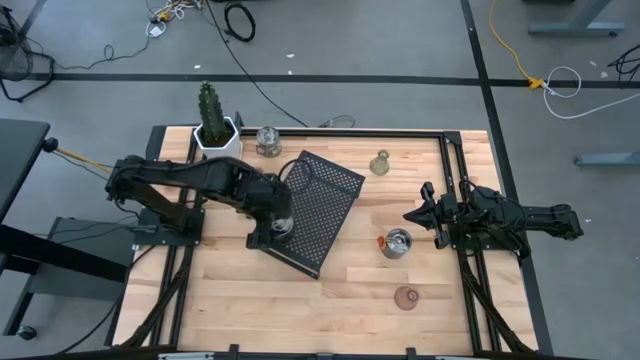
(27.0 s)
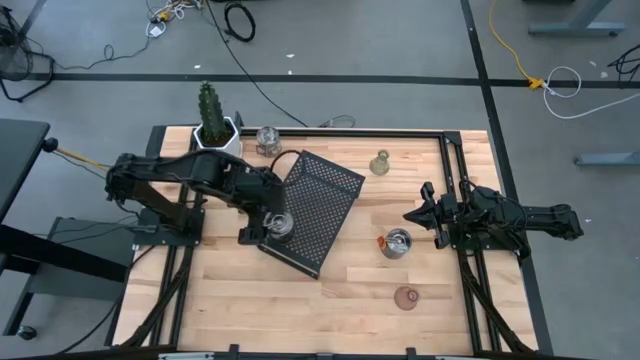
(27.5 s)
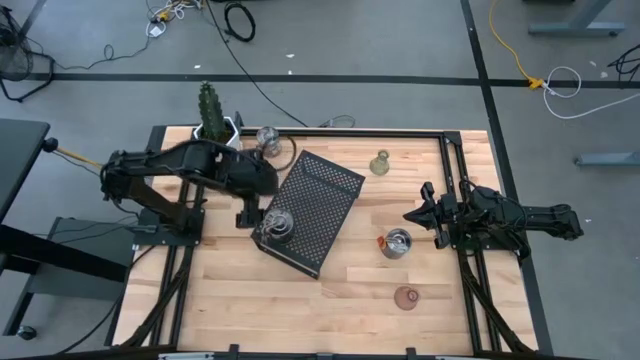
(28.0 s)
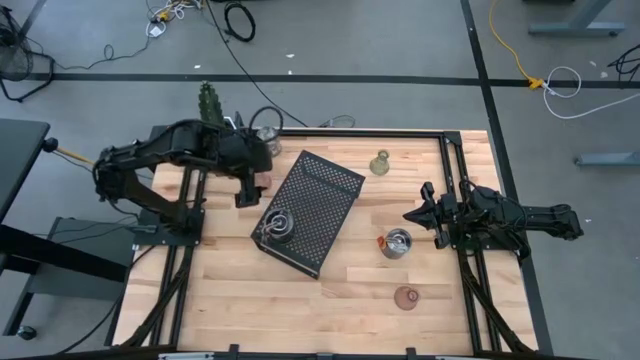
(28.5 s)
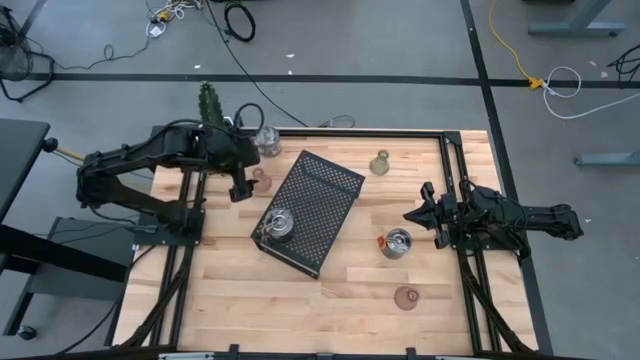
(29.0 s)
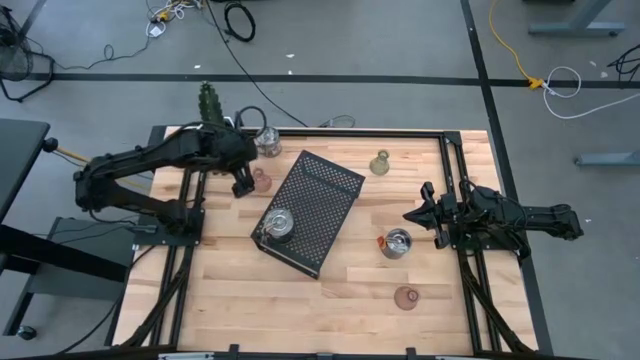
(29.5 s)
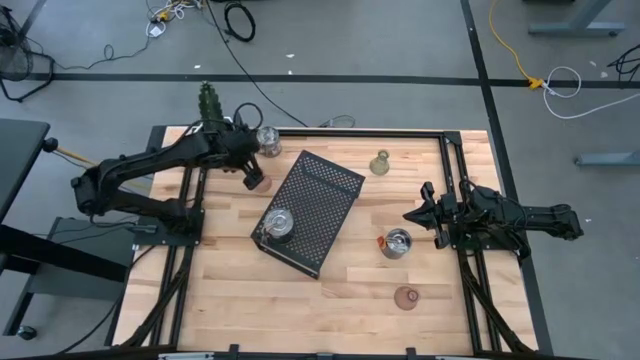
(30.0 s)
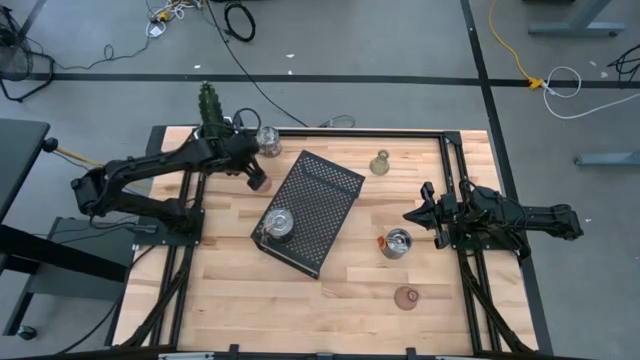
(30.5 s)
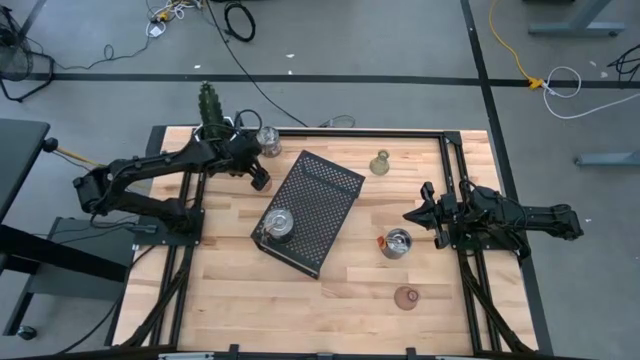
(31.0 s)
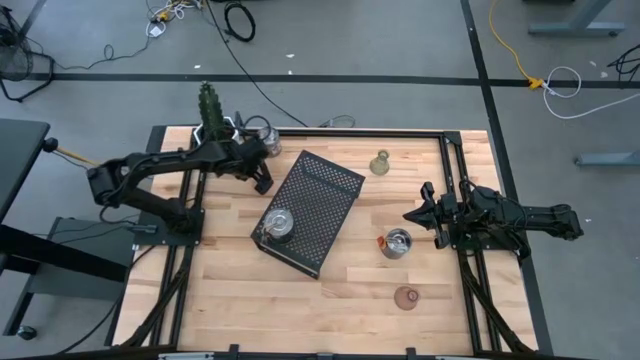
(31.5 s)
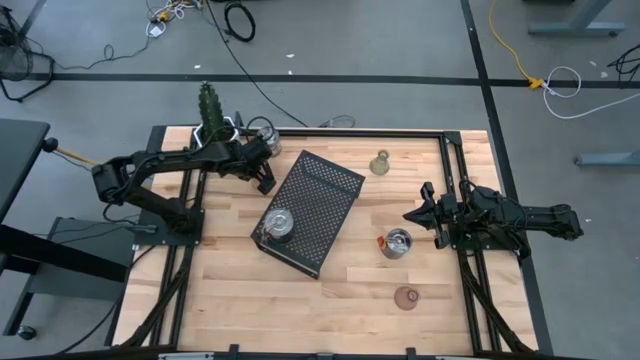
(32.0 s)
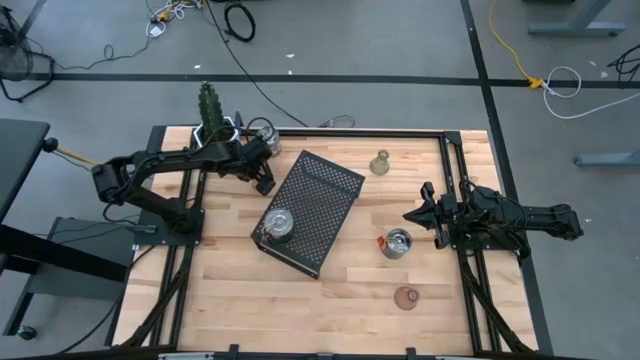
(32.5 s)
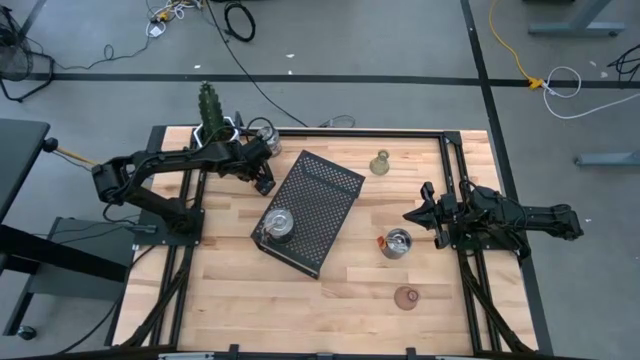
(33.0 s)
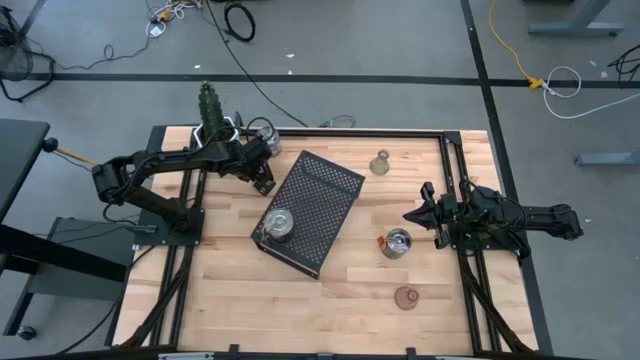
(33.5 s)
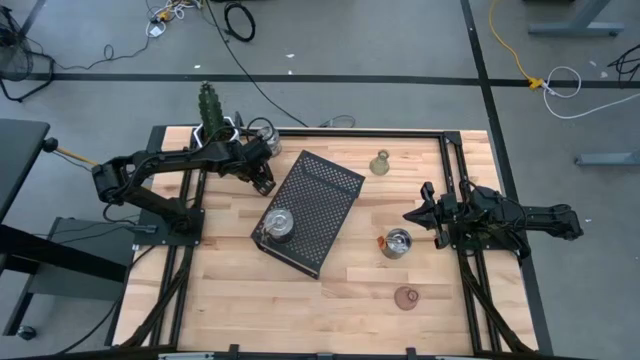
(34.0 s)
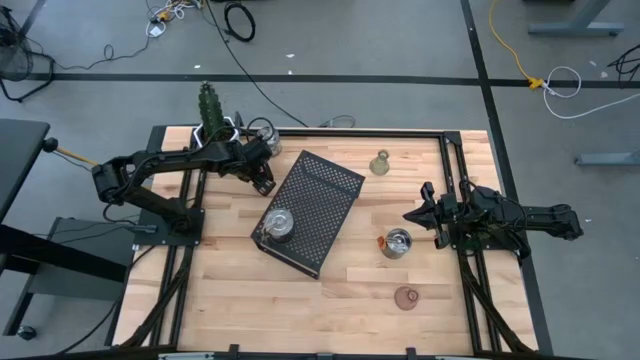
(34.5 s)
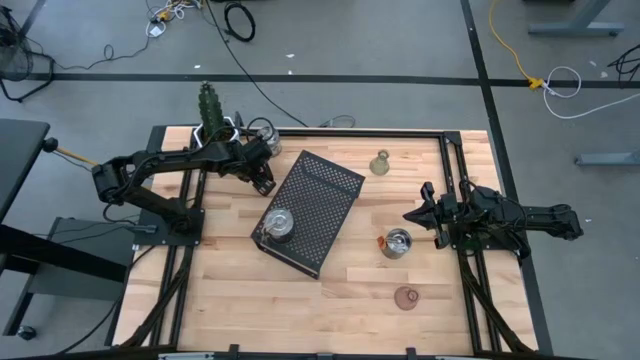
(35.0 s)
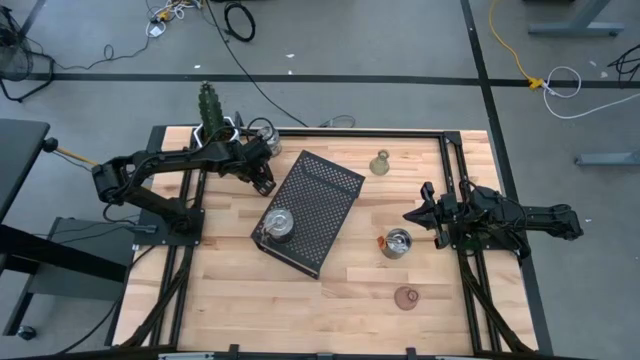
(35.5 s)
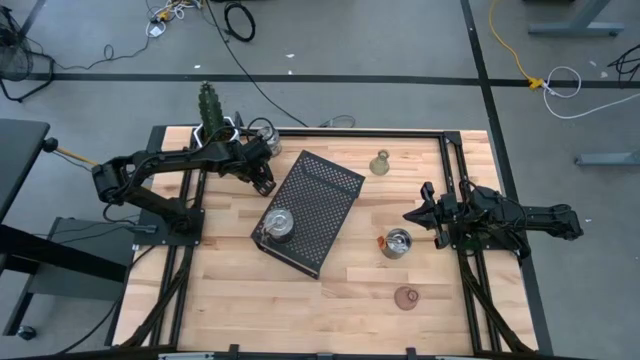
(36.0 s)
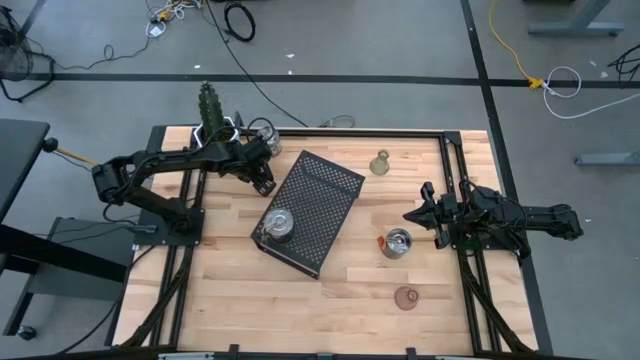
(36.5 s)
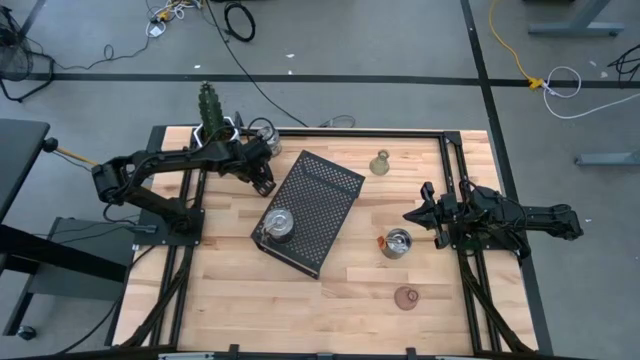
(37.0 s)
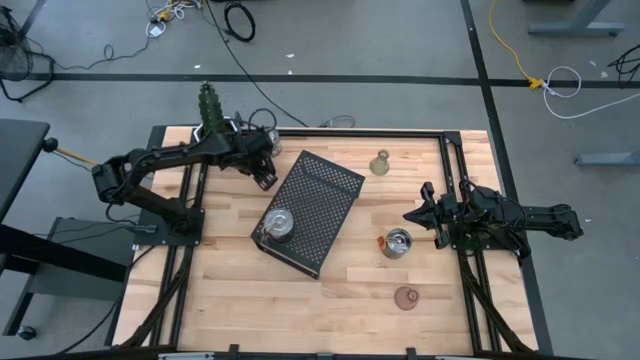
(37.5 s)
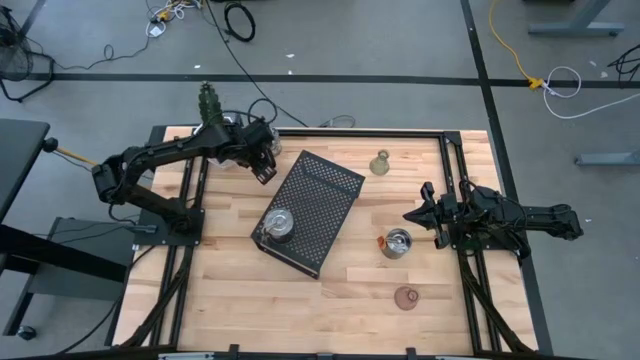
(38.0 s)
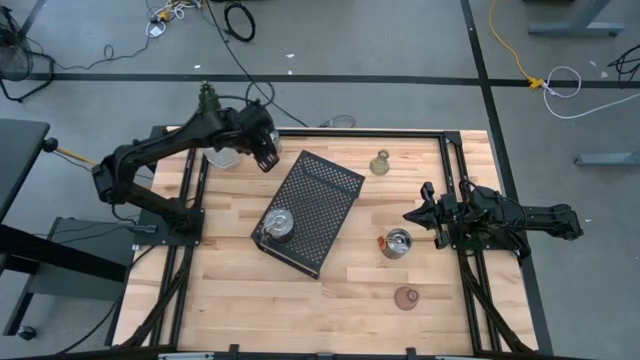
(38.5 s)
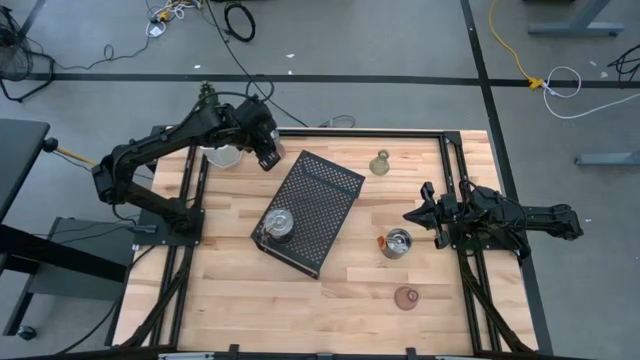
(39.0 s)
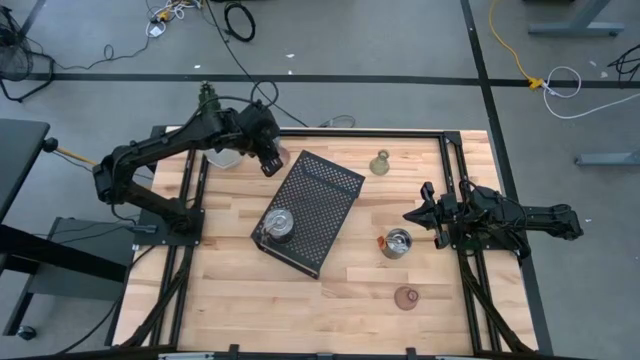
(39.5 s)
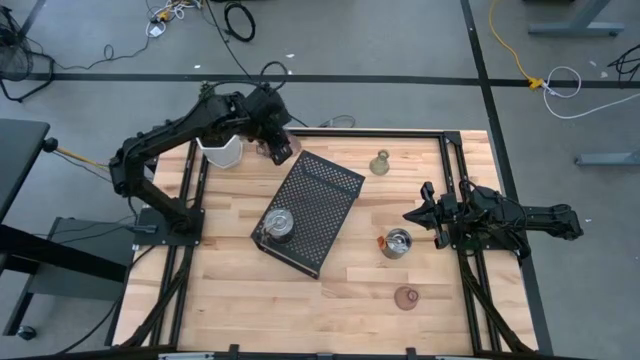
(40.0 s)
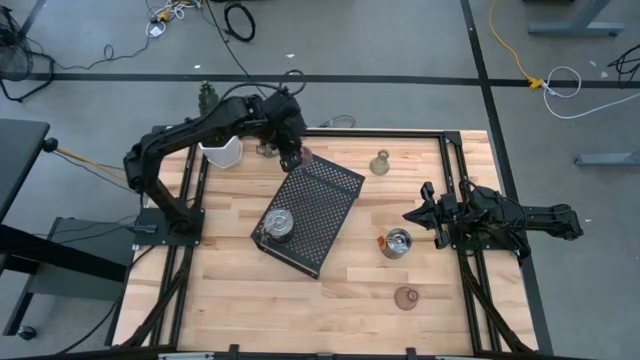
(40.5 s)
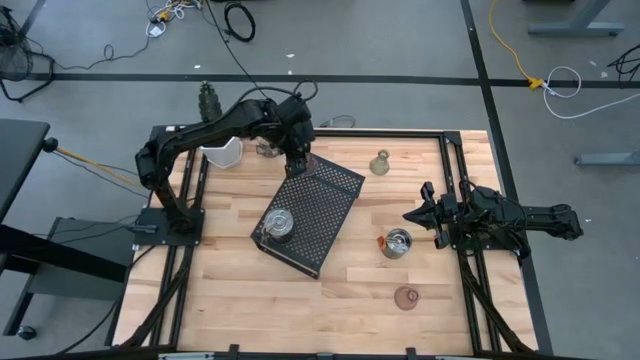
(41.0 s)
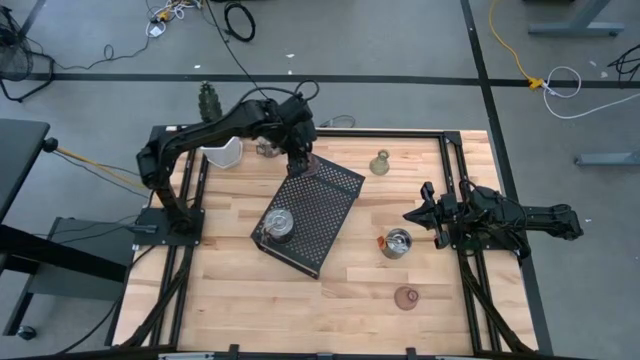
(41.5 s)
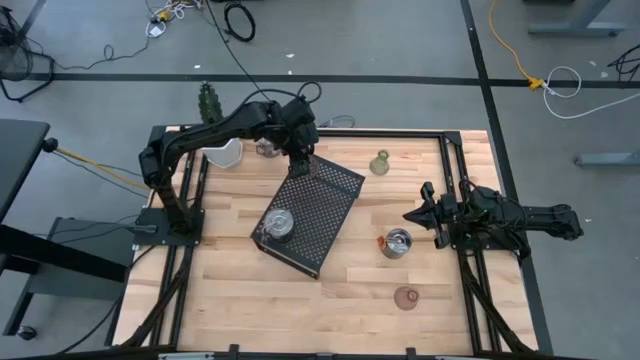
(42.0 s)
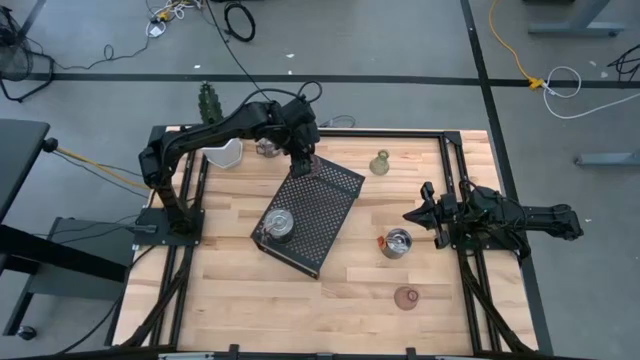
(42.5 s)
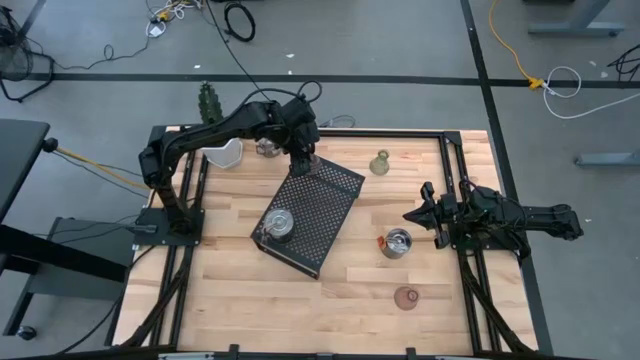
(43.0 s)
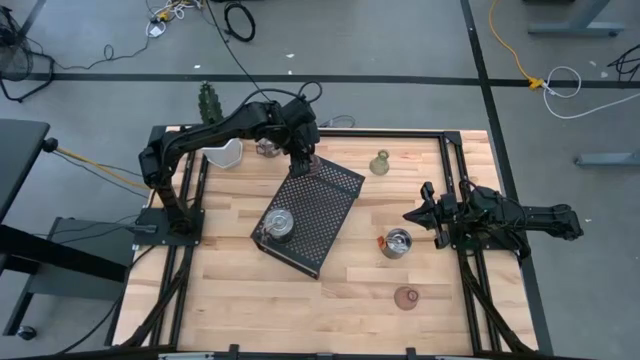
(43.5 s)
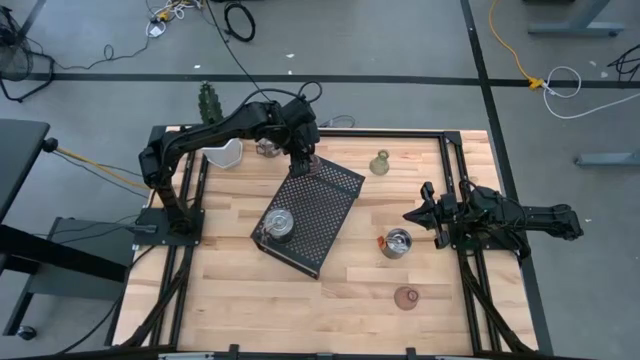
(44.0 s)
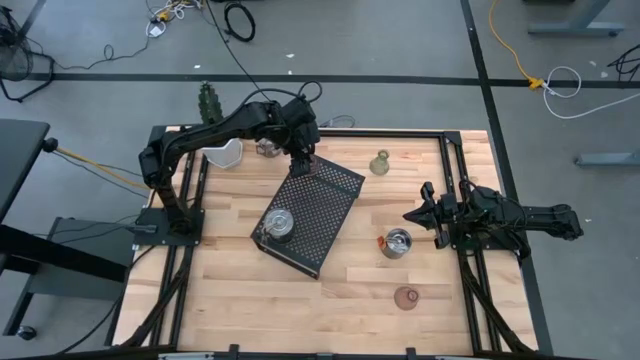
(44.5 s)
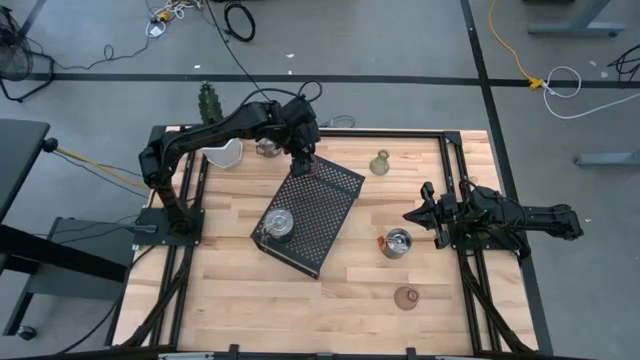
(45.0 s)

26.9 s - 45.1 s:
Task: Pick & Place candle stick holders
Put the top purple candle holder on the shelf
